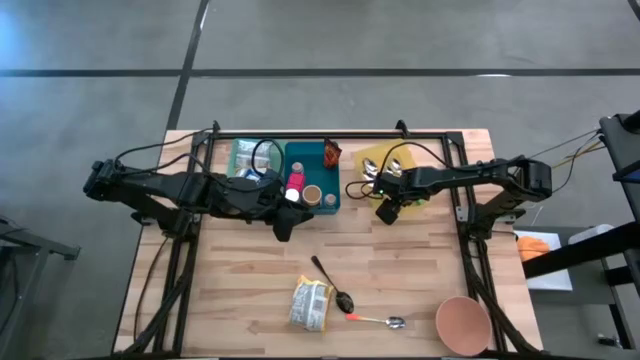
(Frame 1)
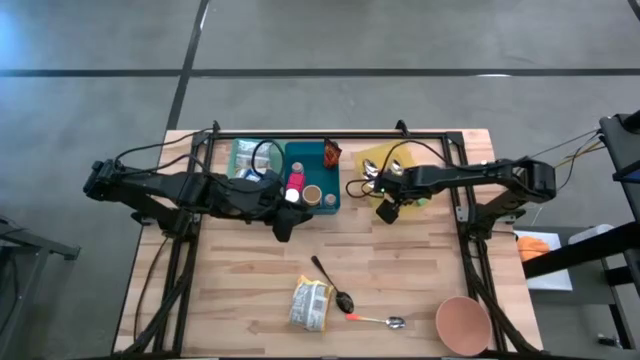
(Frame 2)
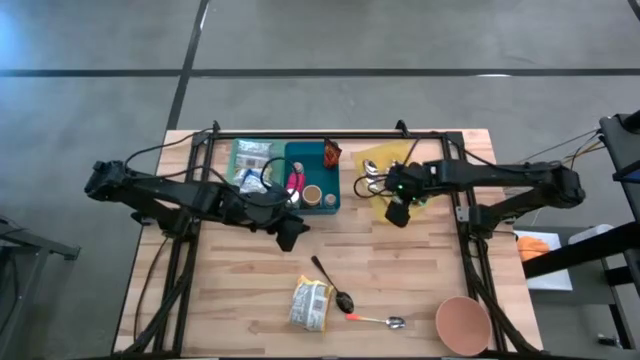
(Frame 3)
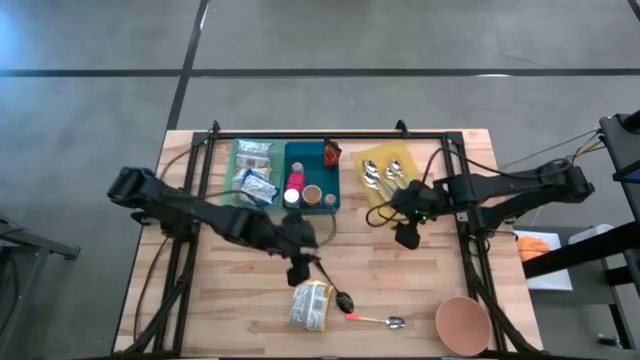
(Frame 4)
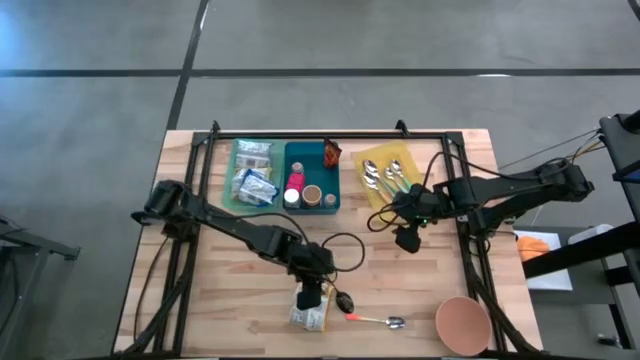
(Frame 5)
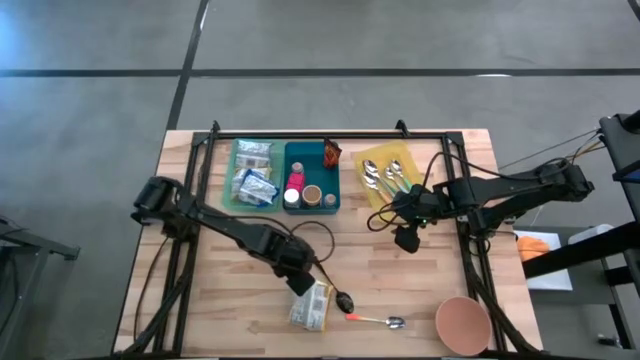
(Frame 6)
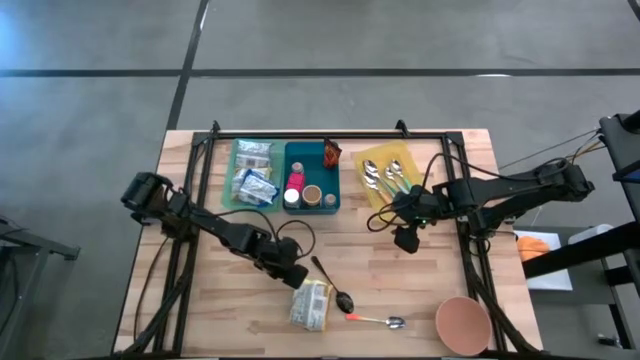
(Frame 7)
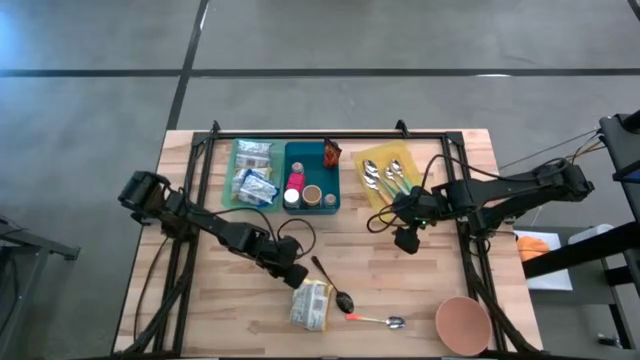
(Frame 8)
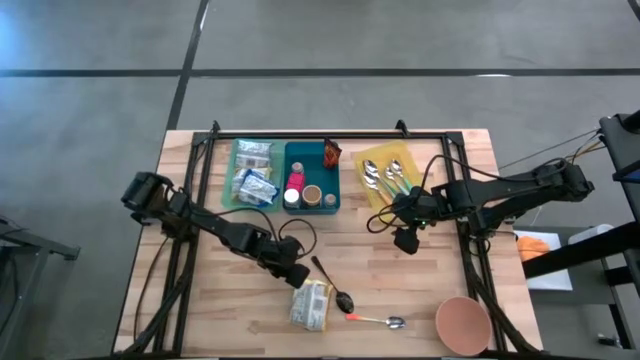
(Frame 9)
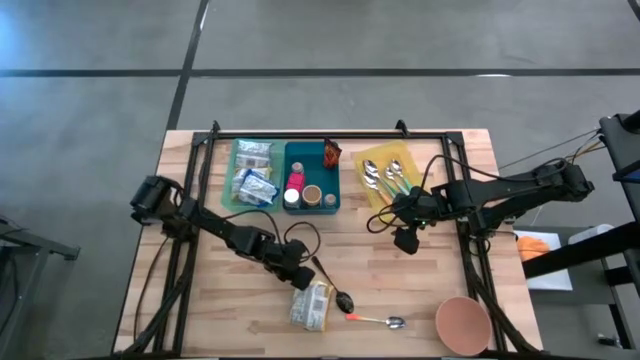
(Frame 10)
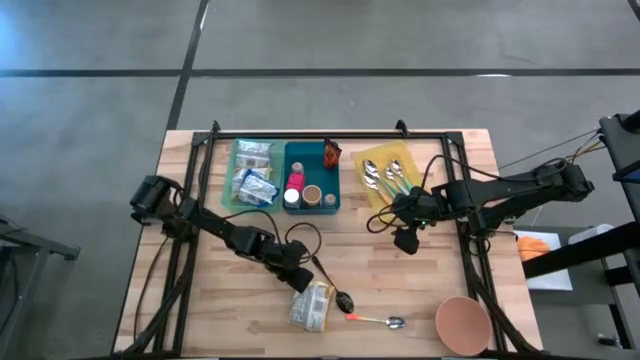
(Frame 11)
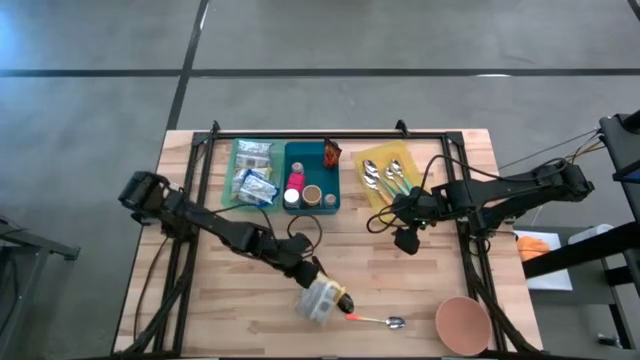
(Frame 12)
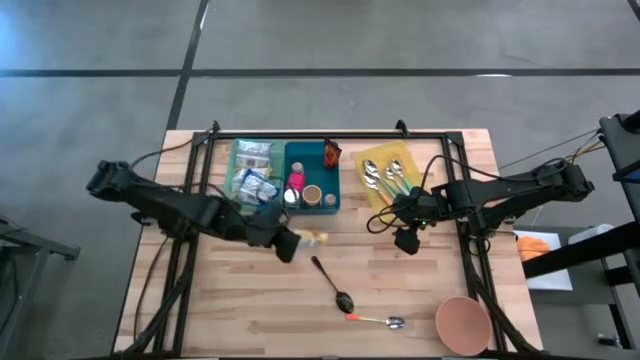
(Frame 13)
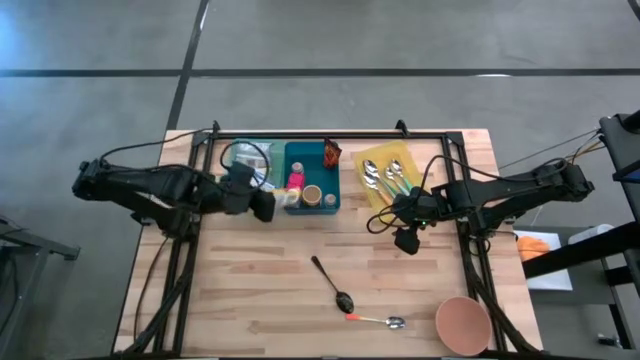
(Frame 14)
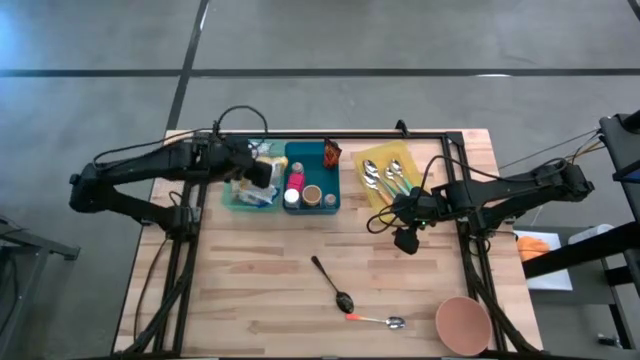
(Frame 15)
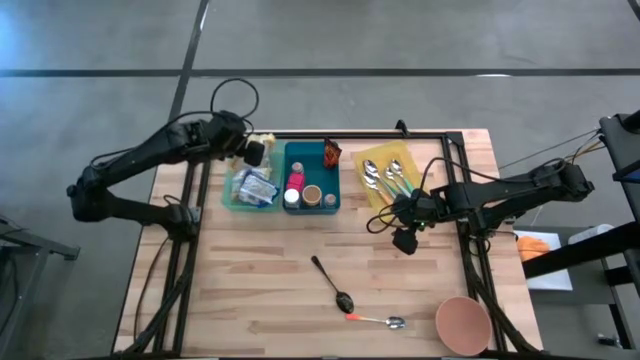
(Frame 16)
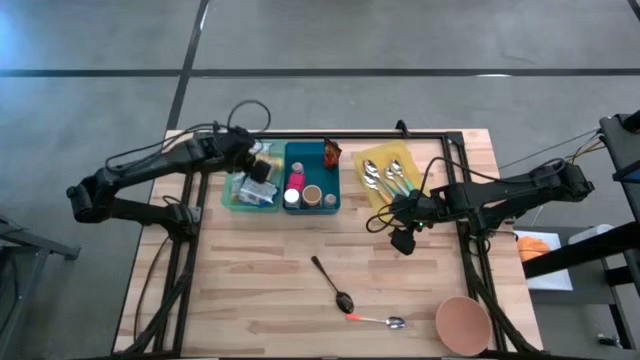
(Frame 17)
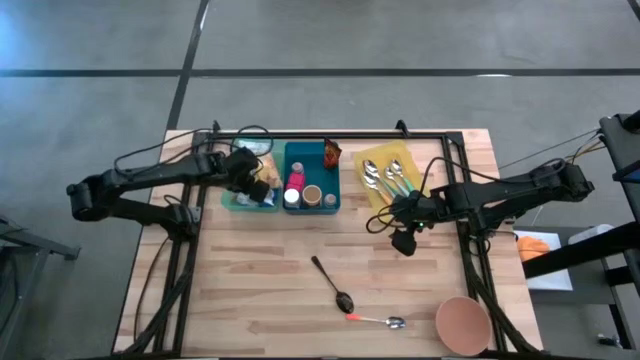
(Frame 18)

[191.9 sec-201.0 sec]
Put the yellow noodle pack into the green bin

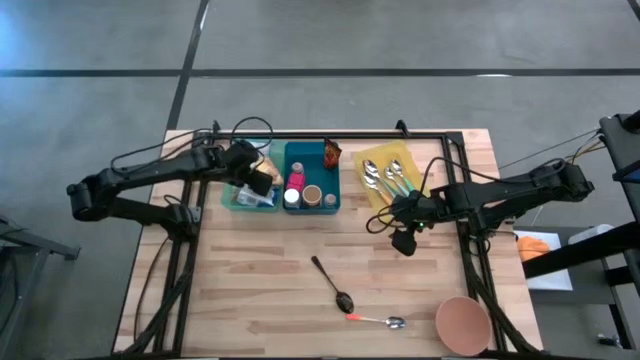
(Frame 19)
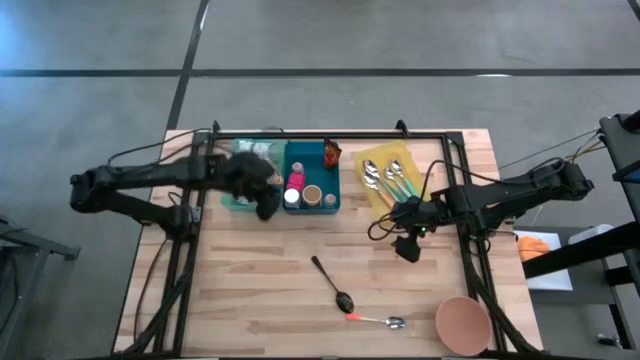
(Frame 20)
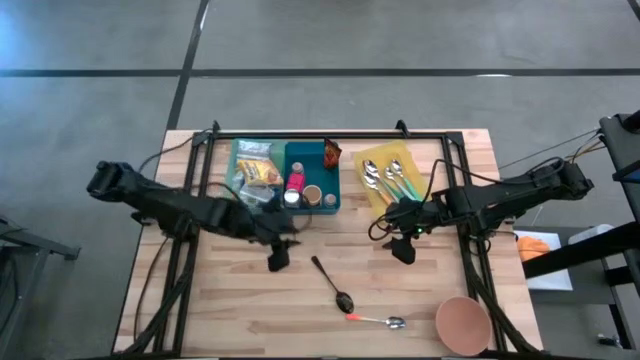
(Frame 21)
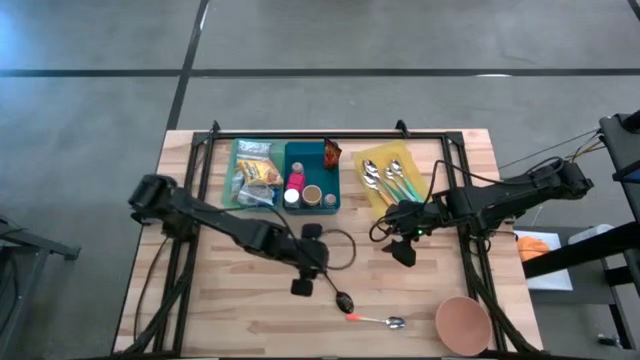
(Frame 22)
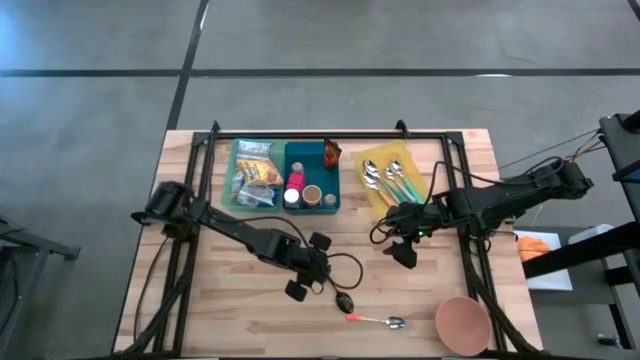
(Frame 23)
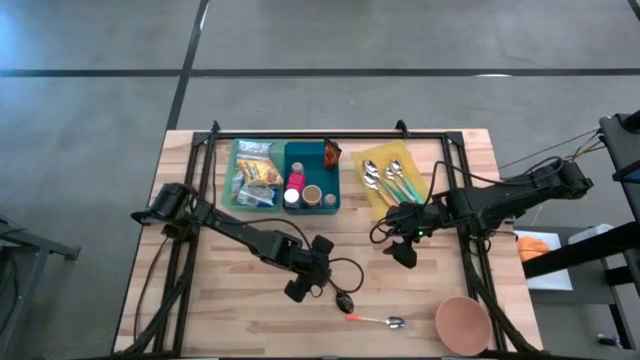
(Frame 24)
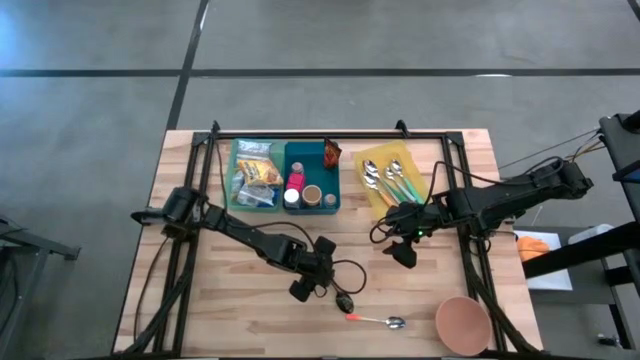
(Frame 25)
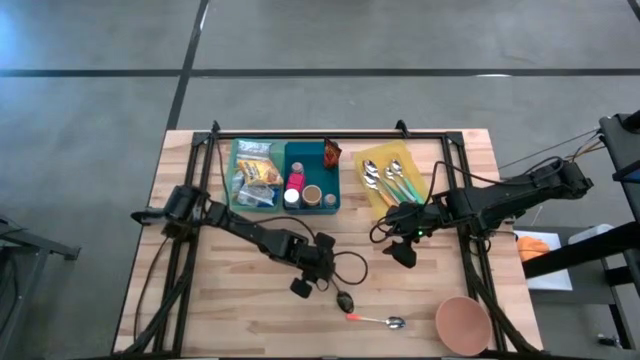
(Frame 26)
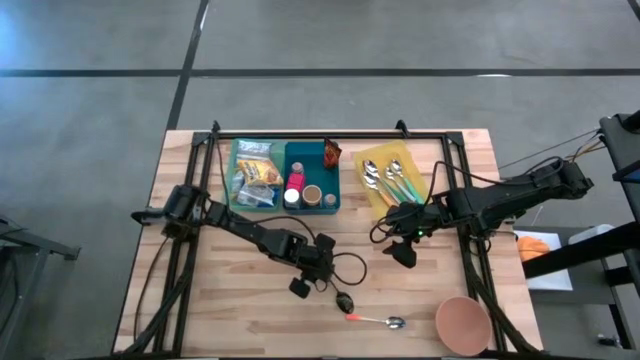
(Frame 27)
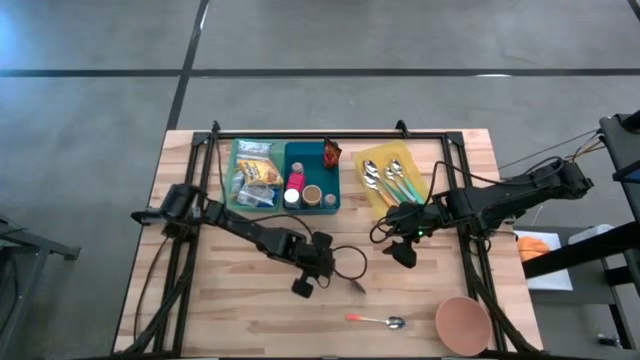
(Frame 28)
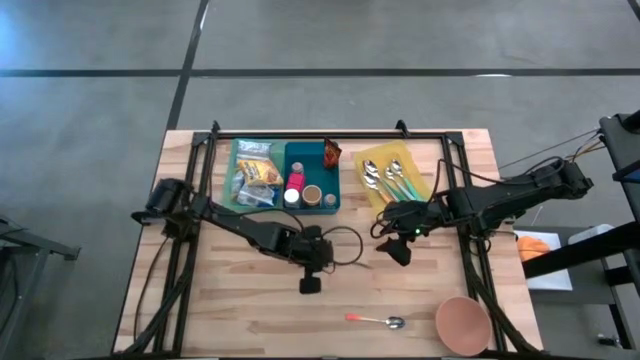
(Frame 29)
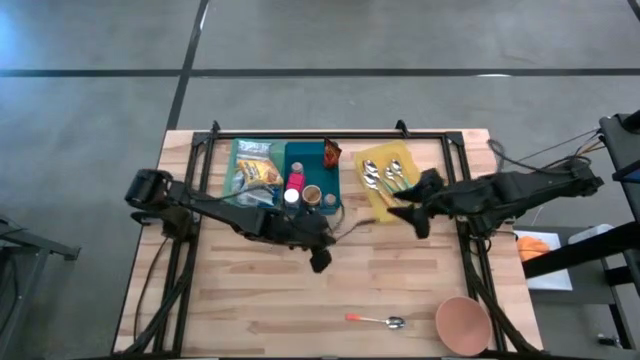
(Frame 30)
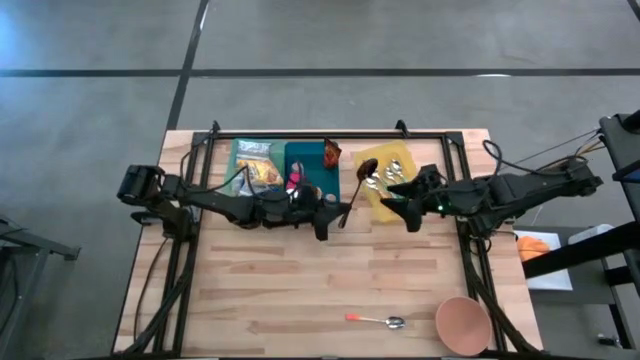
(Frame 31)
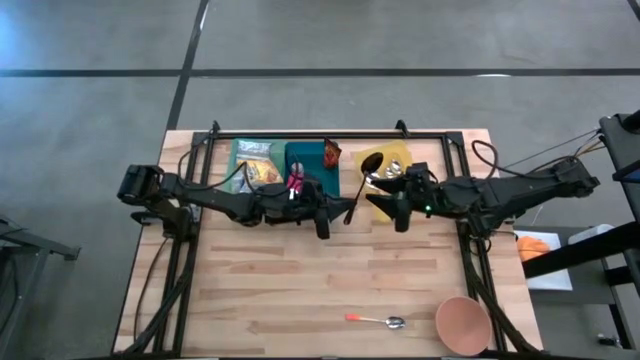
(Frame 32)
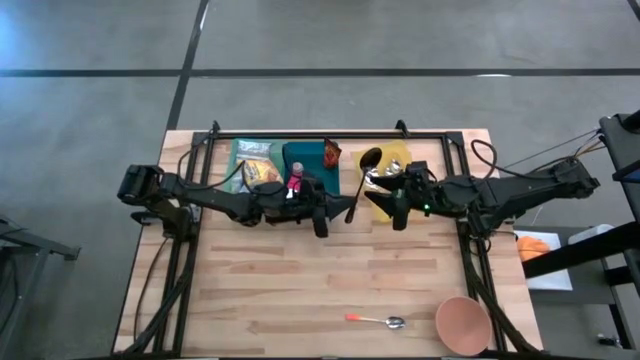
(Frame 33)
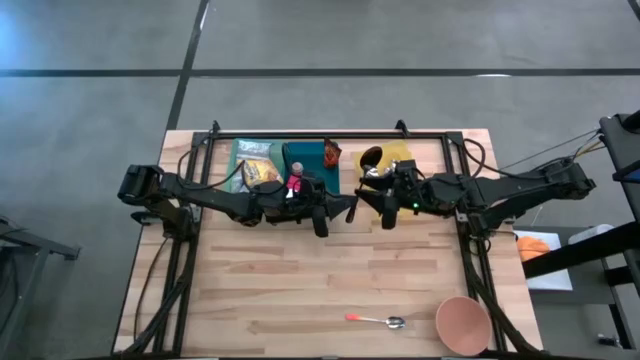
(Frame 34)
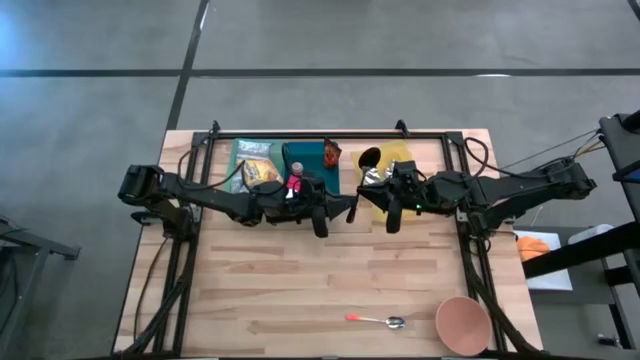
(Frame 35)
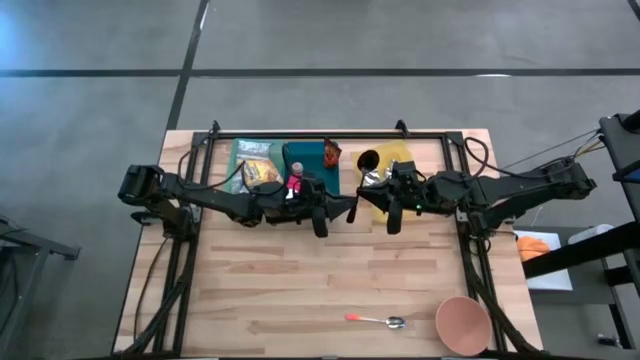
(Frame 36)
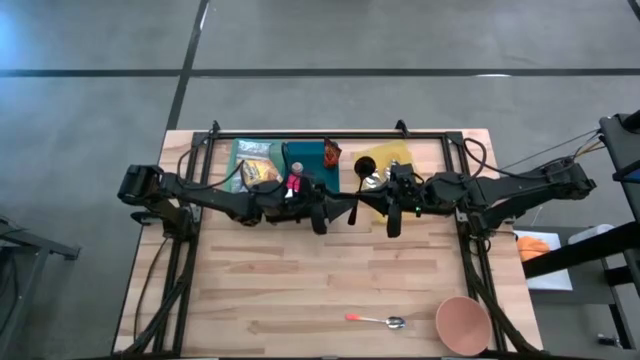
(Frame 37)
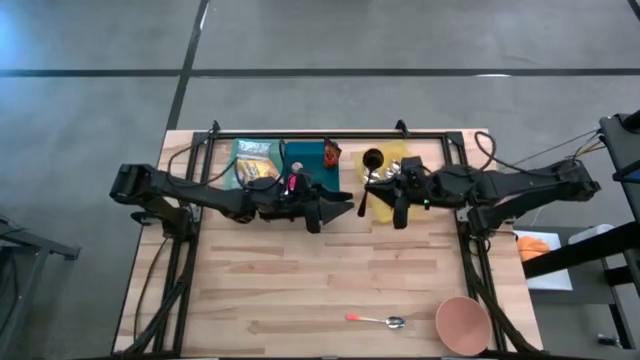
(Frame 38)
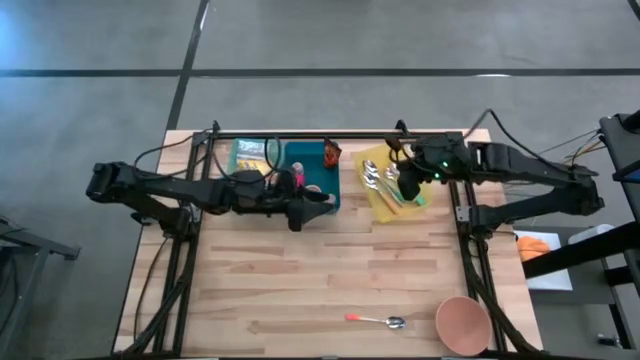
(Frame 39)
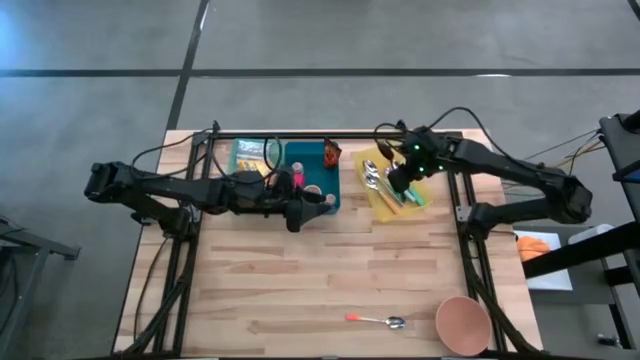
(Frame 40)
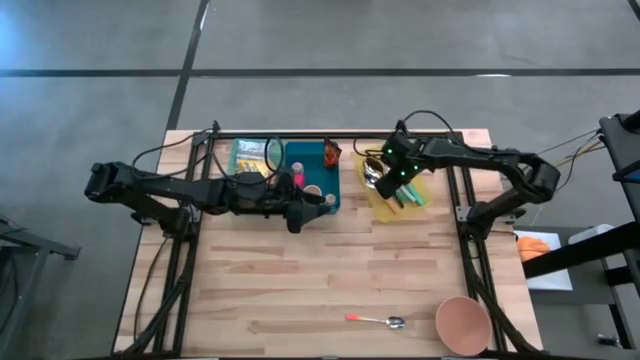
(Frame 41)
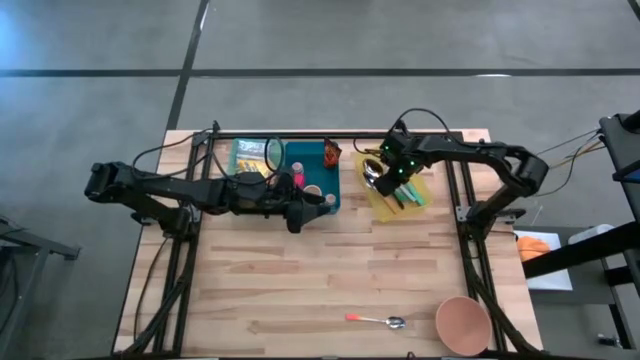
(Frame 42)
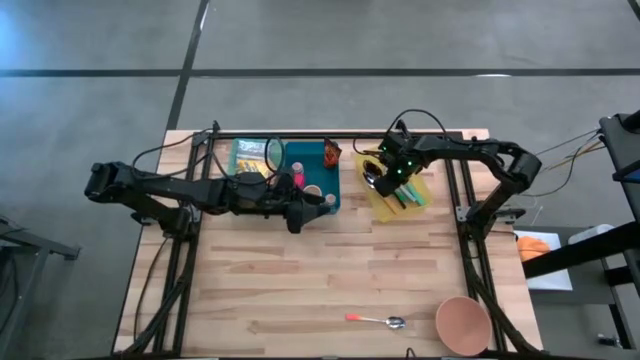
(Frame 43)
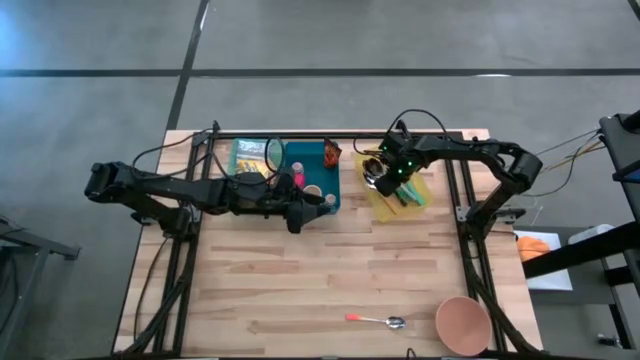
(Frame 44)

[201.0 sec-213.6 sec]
Put the black spoon into the yellow bin
